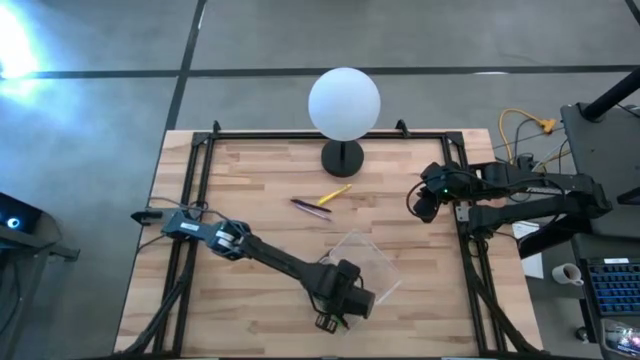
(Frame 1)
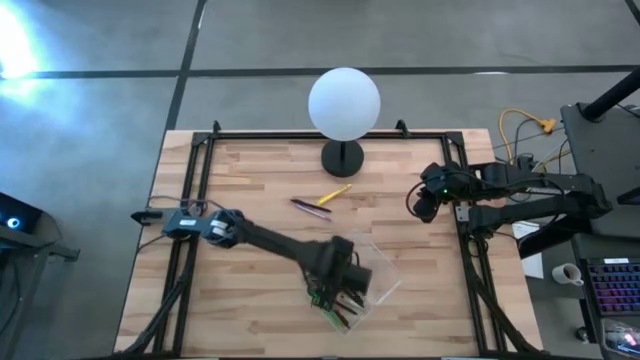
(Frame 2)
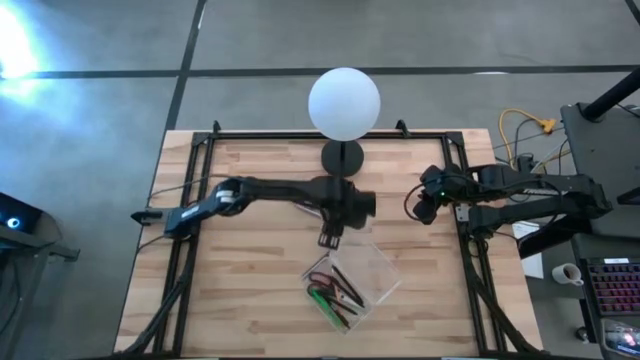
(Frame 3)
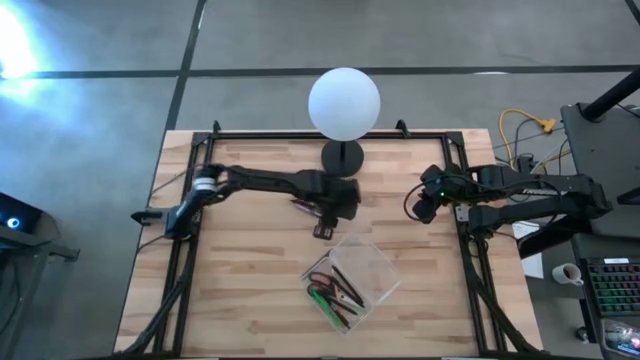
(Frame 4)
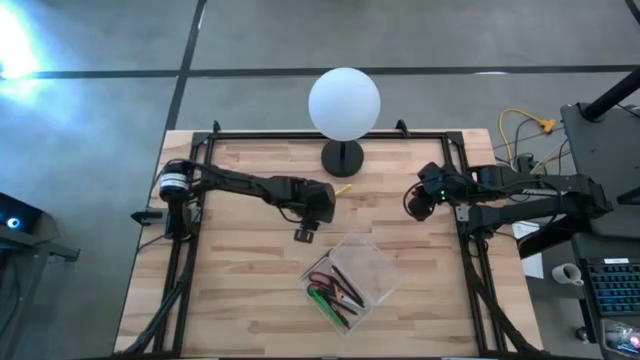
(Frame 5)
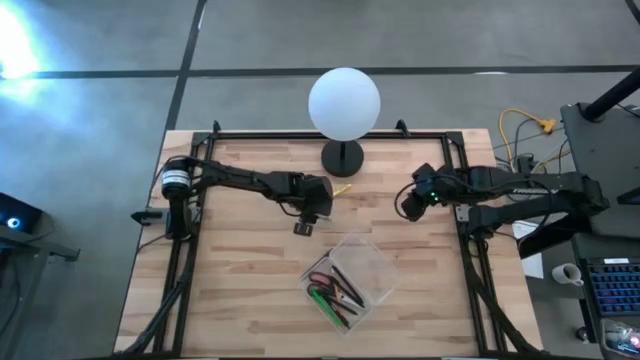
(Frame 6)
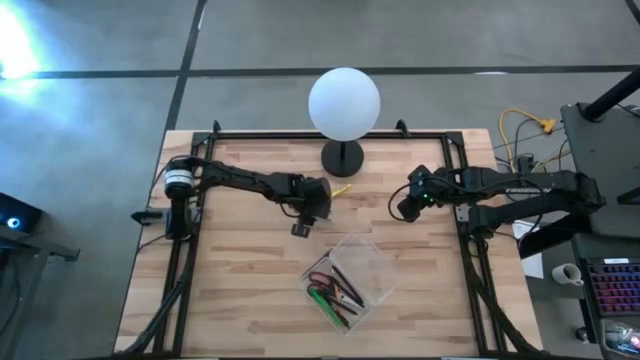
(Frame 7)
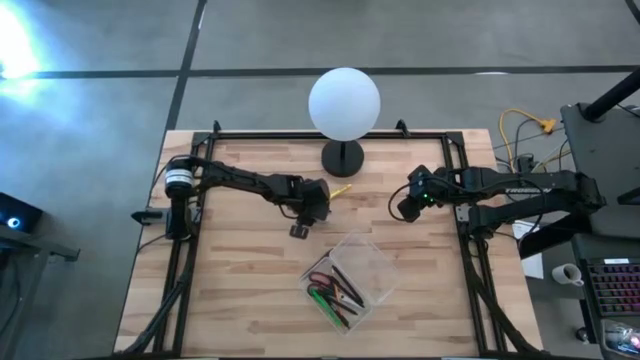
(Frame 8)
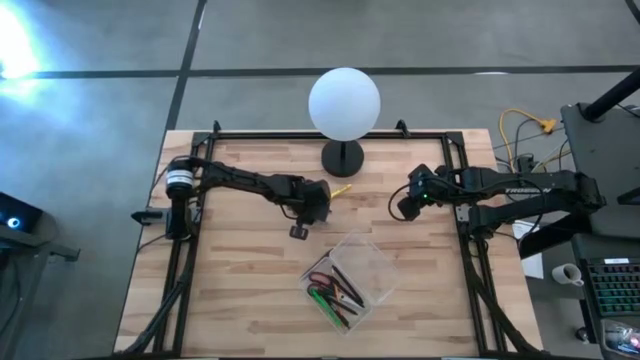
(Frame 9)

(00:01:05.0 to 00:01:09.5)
Task: Pick & place school supplies into a supply box
Put the purple pen into the supply box

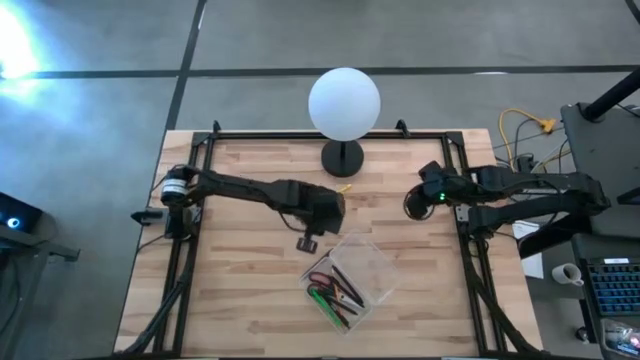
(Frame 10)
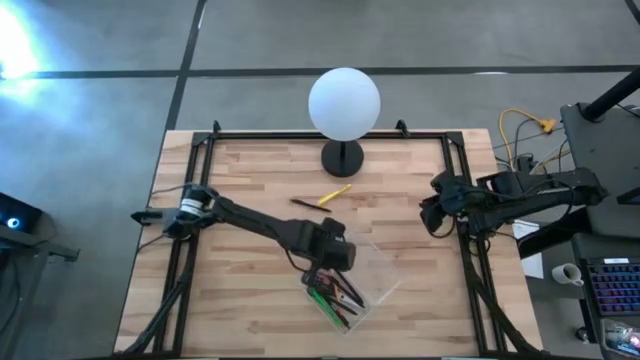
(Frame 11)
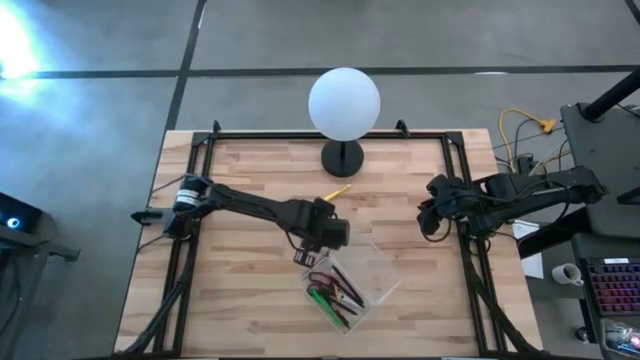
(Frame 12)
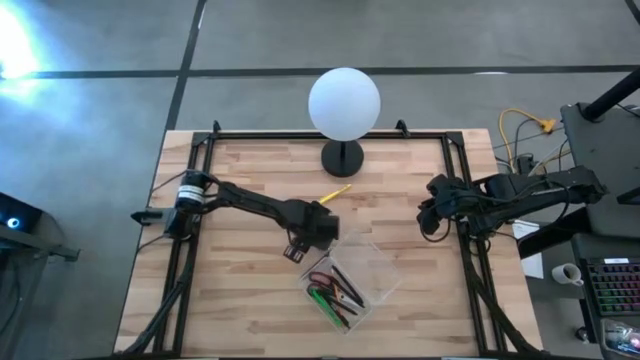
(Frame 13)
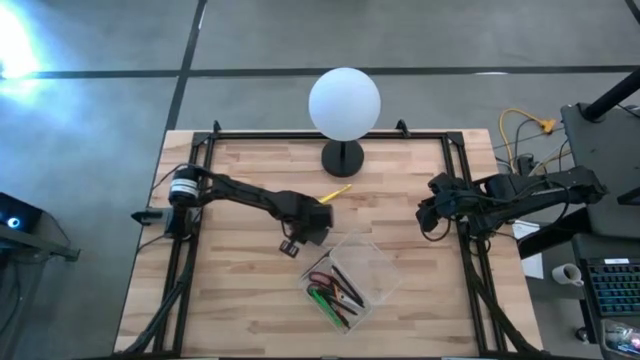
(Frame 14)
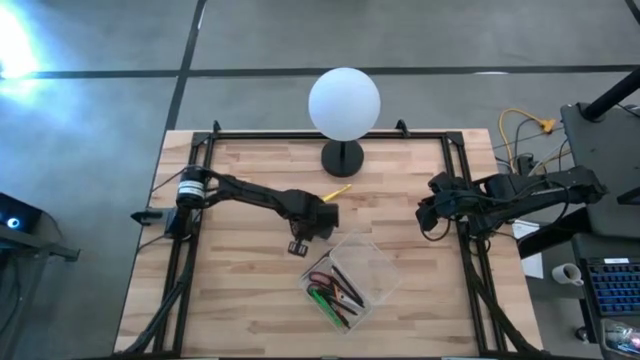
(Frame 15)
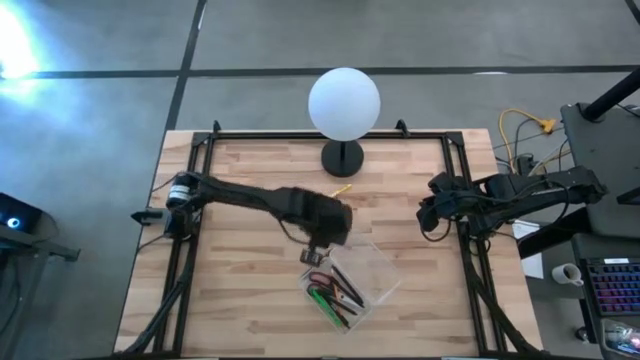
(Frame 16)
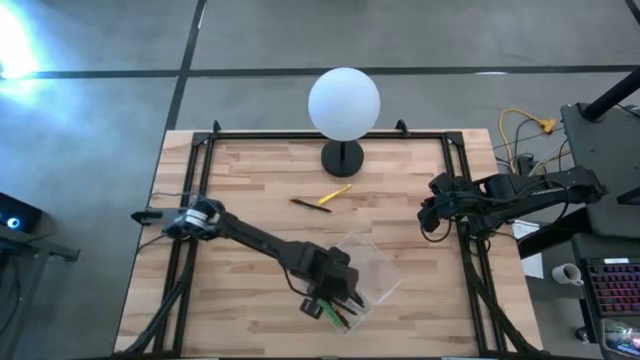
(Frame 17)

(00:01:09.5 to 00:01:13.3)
Put the purple pen into the supply box

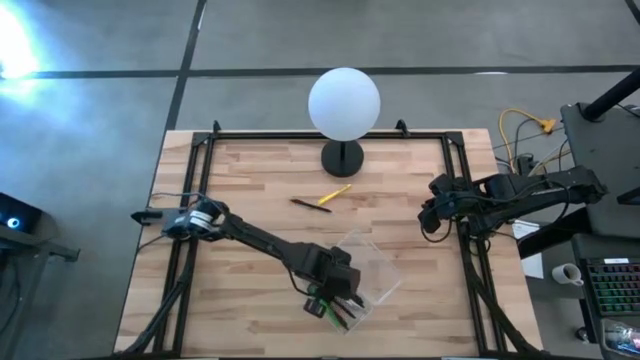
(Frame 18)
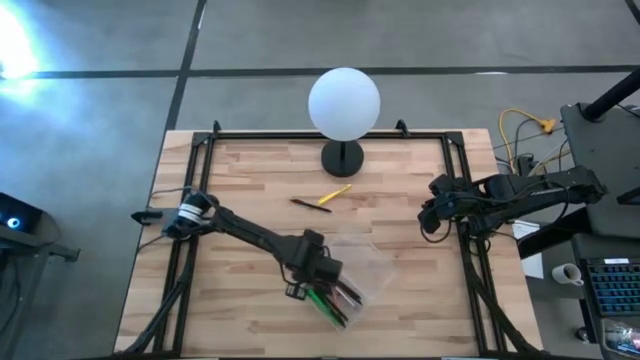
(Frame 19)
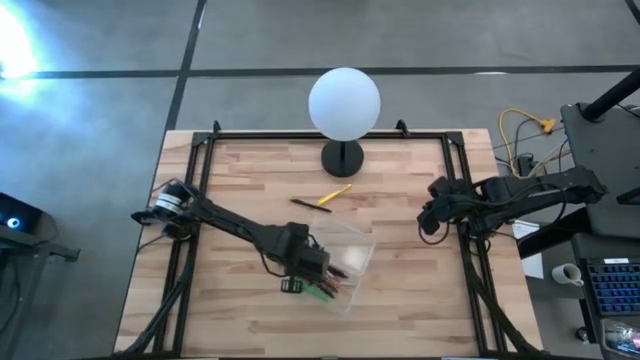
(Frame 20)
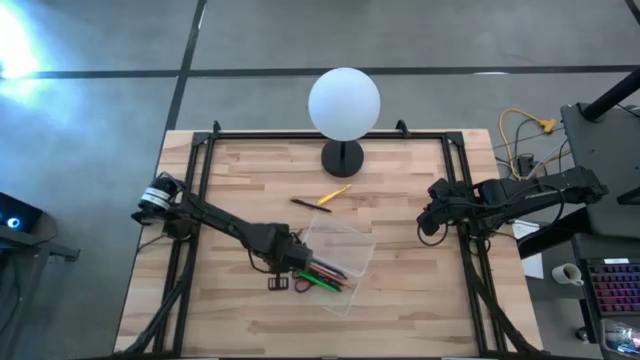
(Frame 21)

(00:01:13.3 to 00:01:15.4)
Adjust the supply box

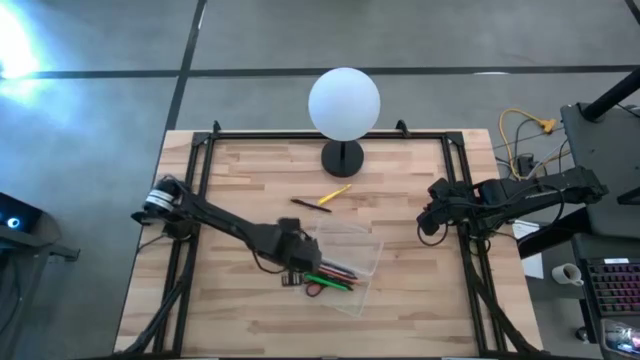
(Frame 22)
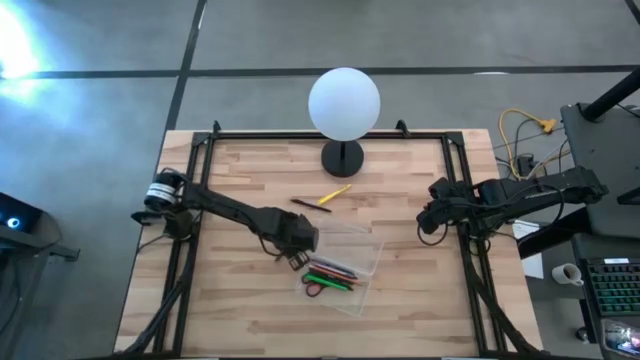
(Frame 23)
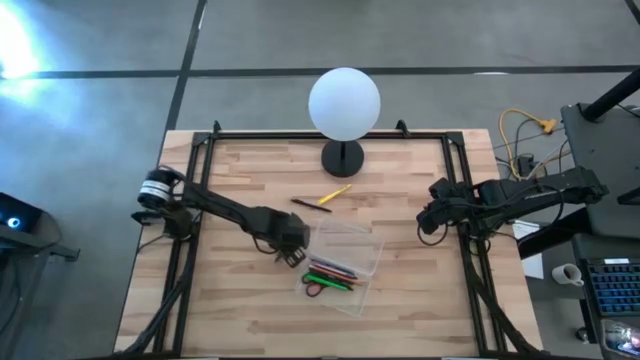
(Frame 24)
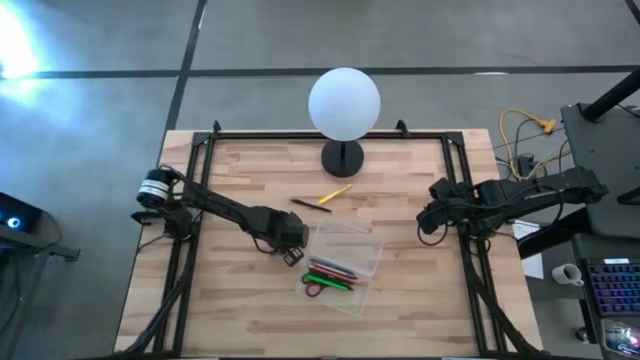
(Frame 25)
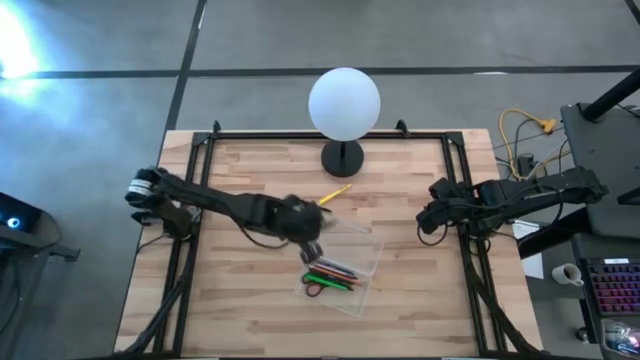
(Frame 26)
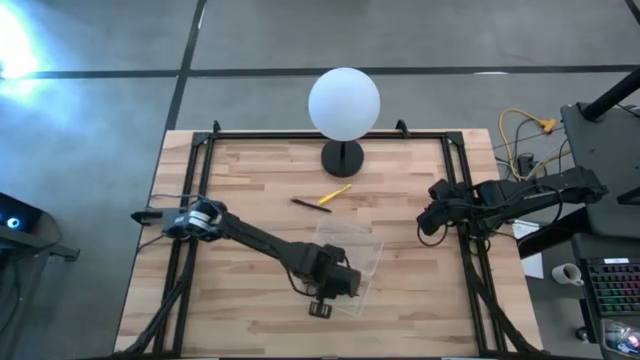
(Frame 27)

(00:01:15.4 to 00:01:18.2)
Put the brown pen into the supply box

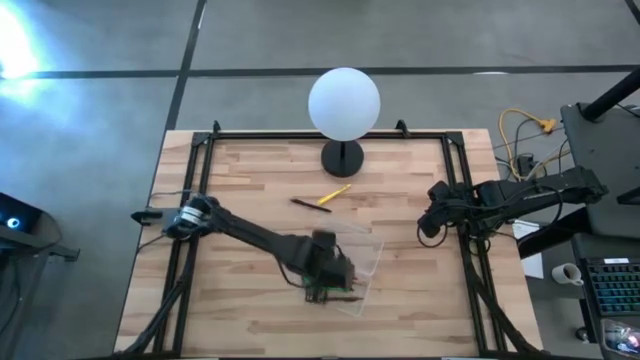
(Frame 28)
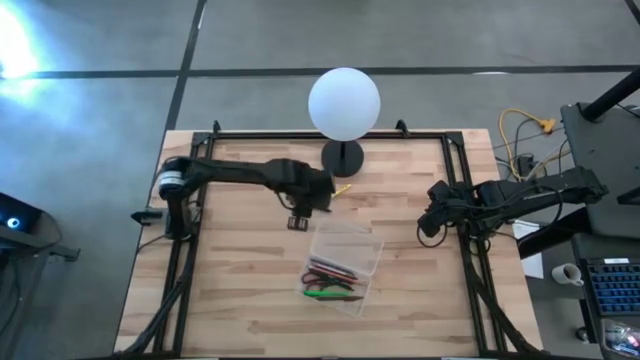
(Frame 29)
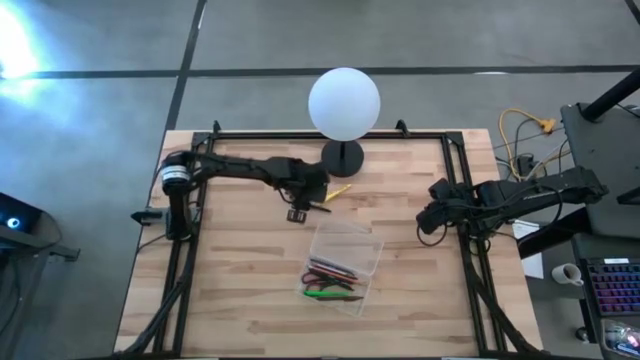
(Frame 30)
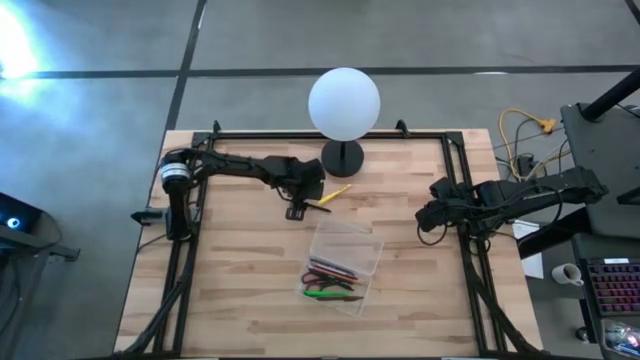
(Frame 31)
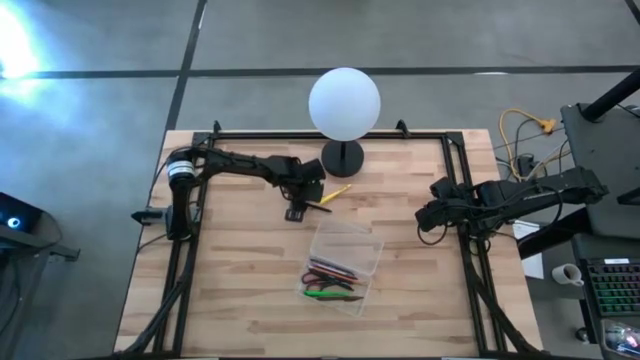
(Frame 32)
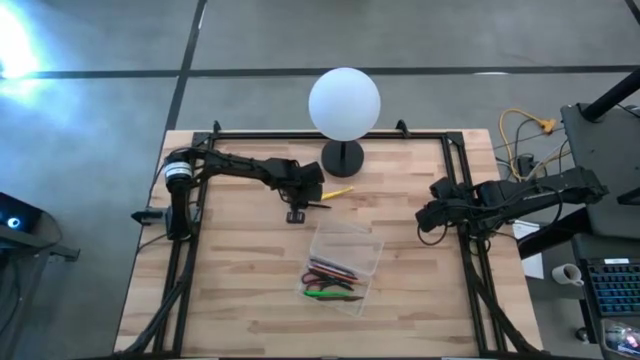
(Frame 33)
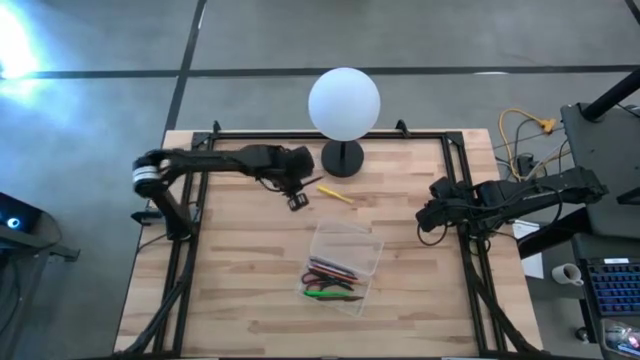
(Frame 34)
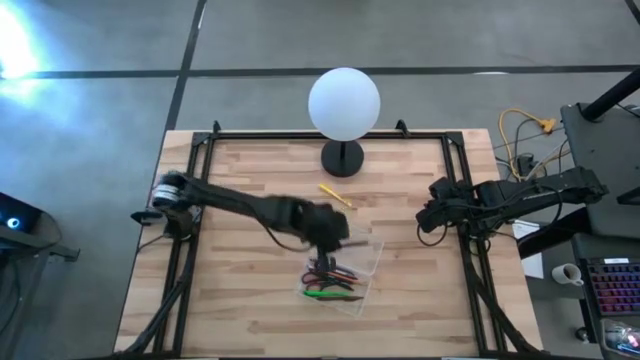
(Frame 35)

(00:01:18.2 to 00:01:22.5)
Put the black pen into the supply box

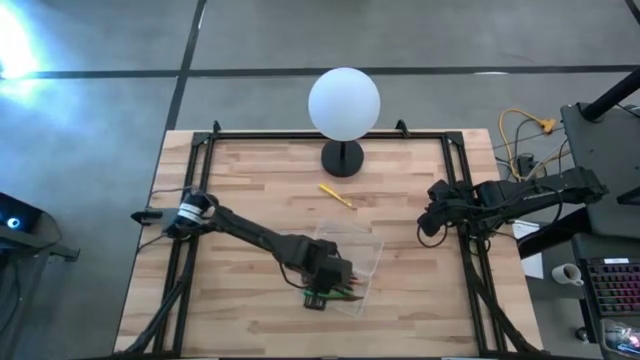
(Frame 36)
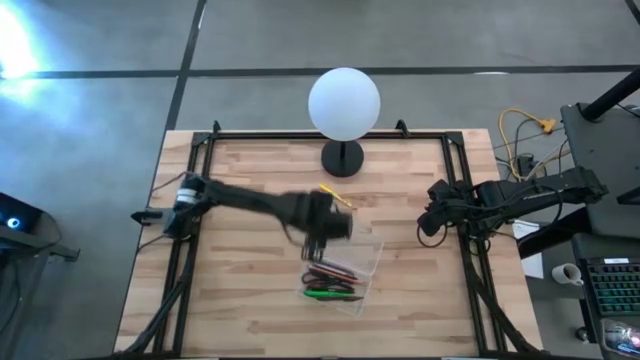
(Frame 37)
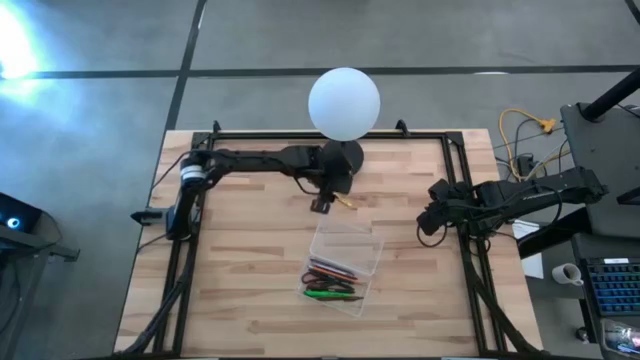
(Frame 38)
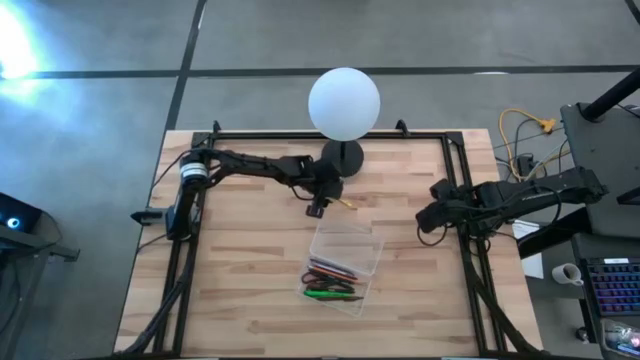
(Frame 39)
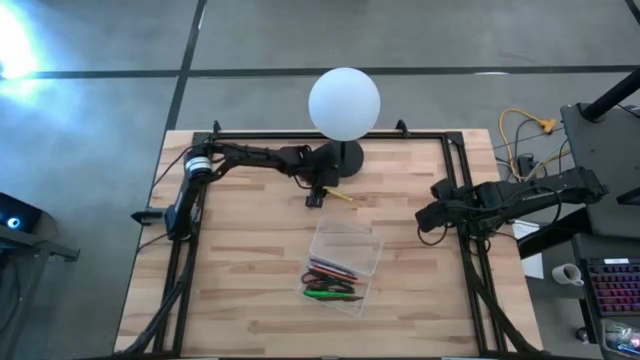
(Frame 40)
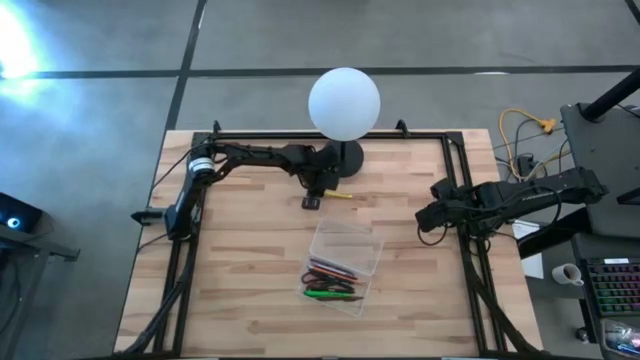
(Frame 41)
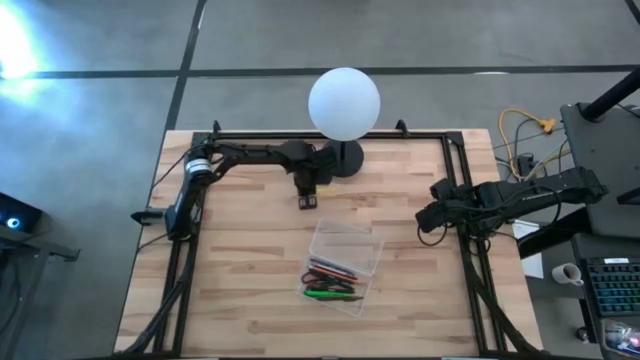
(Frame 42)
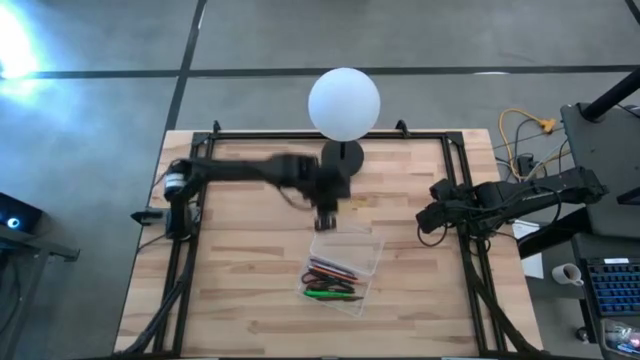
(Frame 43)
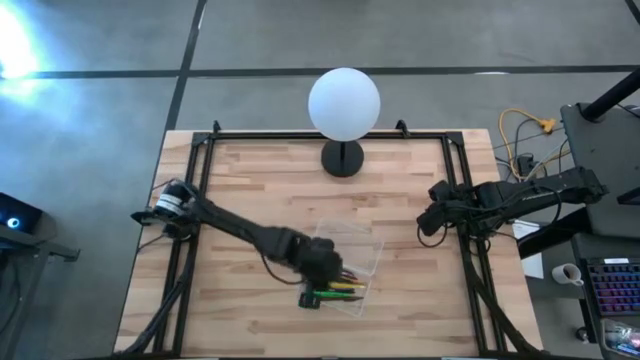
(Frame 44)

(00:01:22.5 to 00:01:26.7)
Put the yellow pen into the supply box
